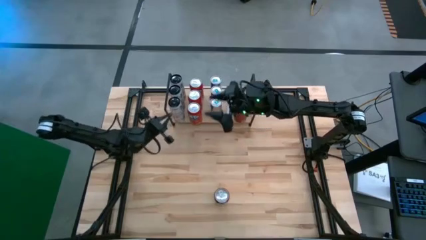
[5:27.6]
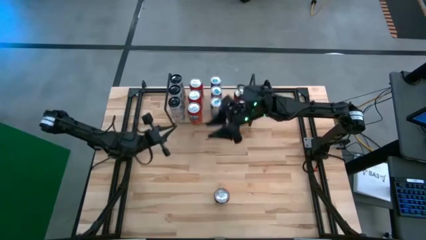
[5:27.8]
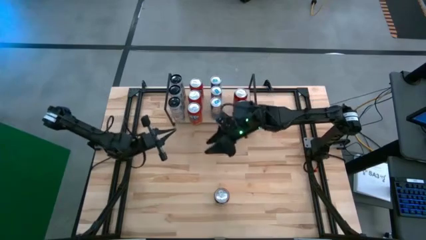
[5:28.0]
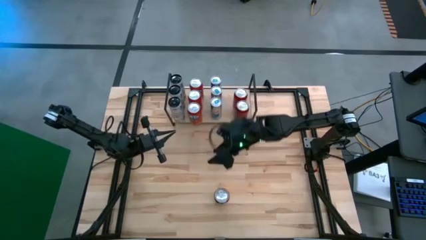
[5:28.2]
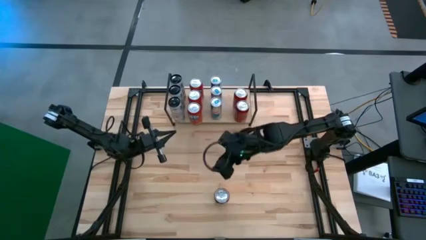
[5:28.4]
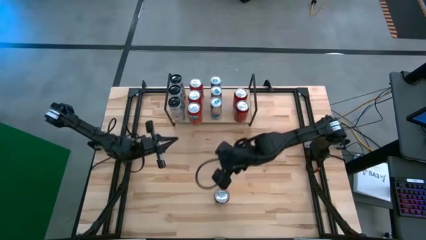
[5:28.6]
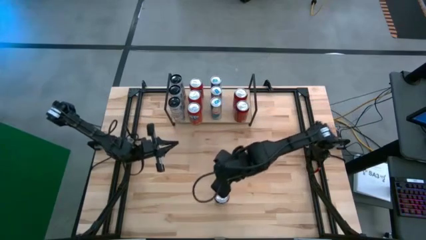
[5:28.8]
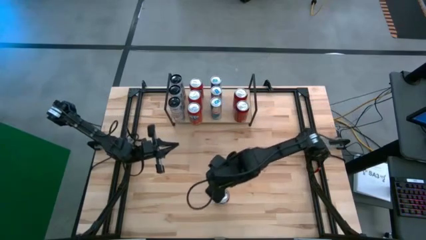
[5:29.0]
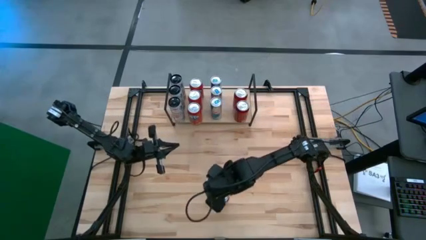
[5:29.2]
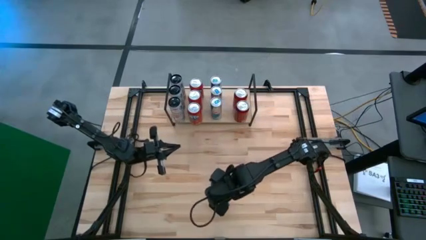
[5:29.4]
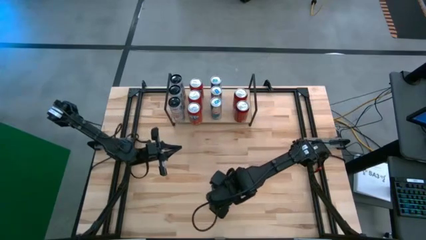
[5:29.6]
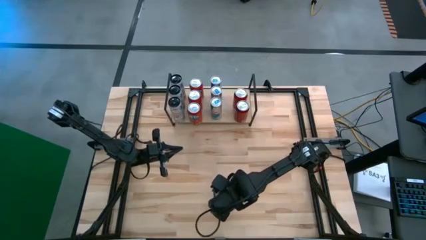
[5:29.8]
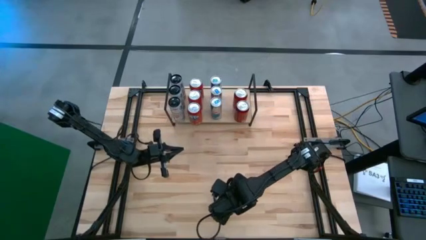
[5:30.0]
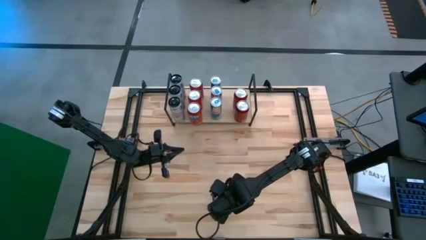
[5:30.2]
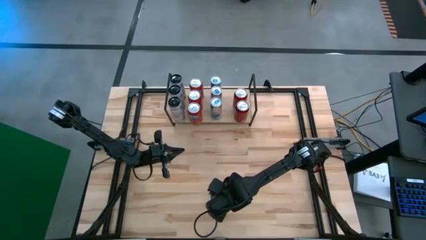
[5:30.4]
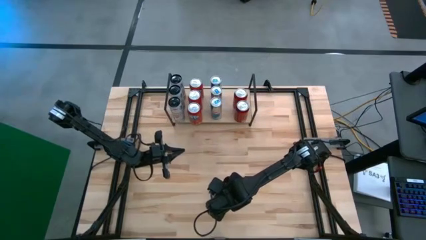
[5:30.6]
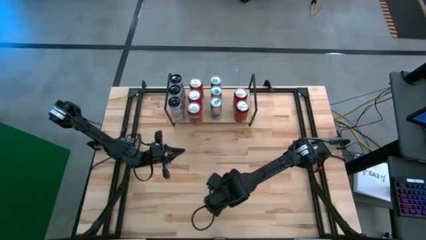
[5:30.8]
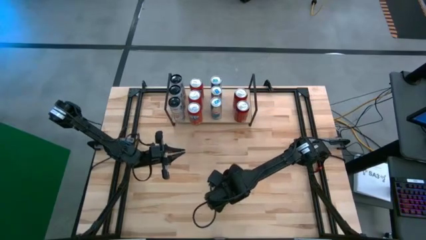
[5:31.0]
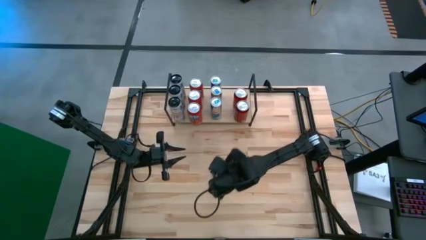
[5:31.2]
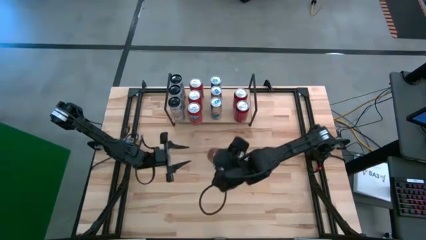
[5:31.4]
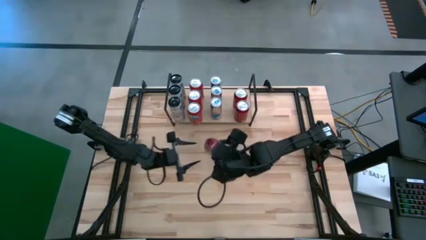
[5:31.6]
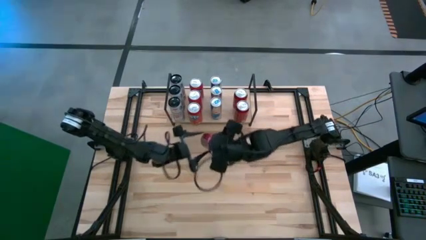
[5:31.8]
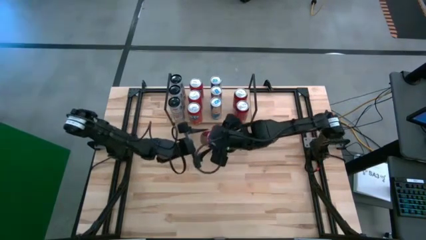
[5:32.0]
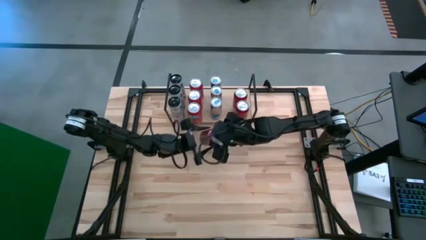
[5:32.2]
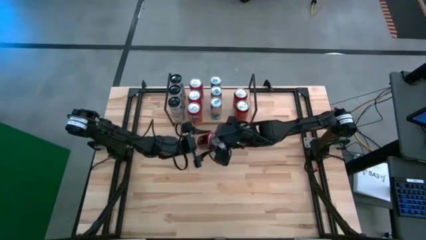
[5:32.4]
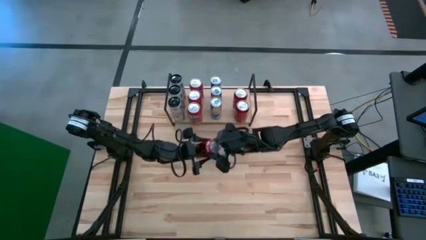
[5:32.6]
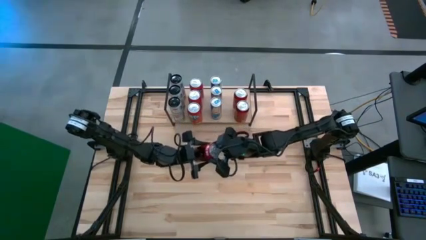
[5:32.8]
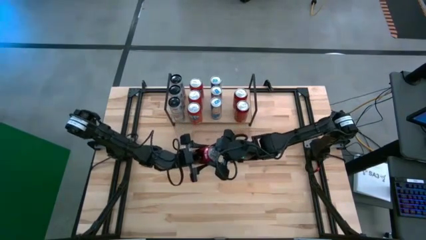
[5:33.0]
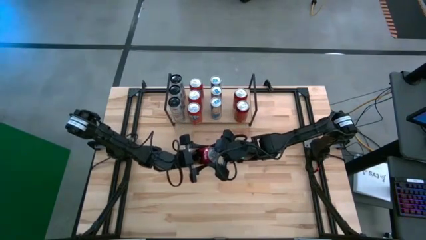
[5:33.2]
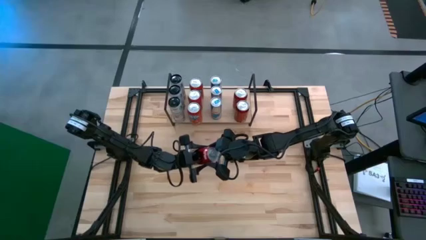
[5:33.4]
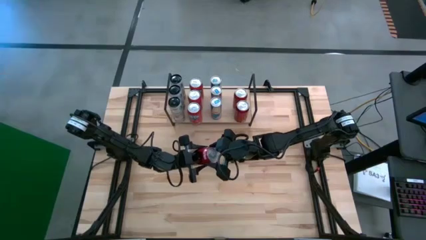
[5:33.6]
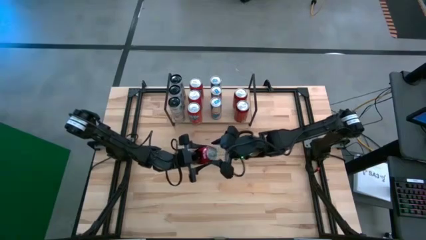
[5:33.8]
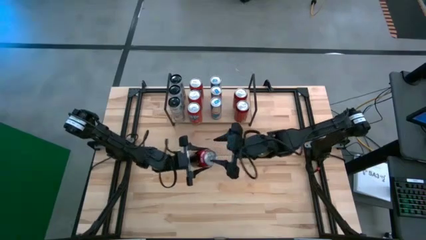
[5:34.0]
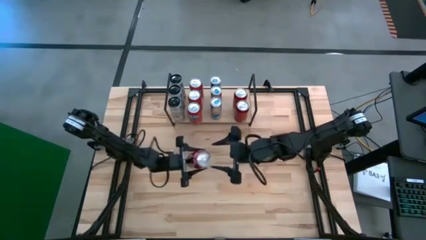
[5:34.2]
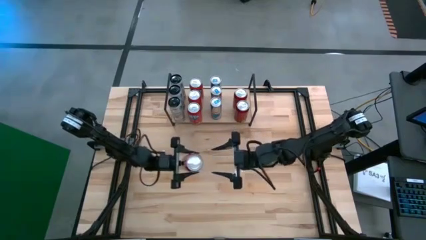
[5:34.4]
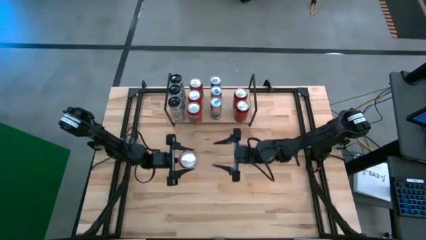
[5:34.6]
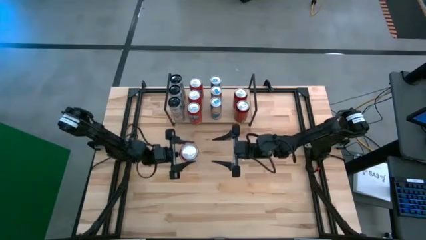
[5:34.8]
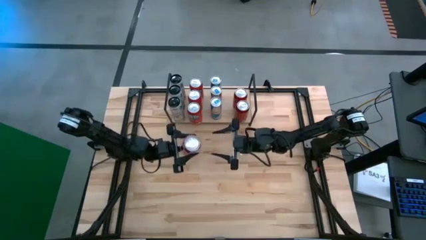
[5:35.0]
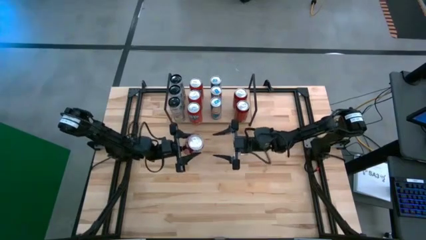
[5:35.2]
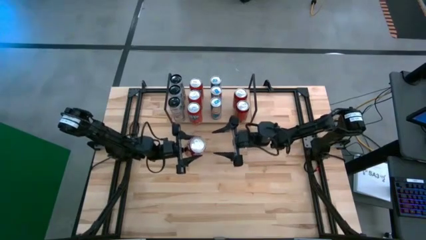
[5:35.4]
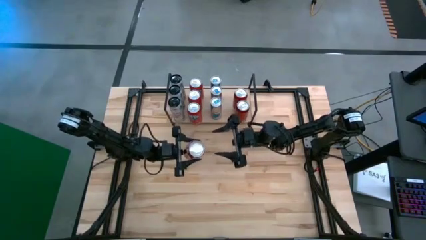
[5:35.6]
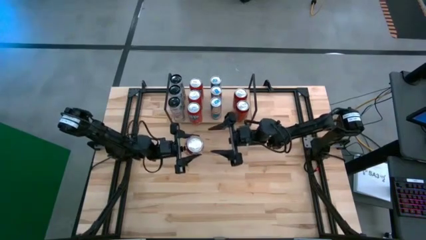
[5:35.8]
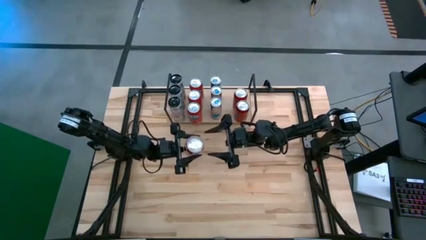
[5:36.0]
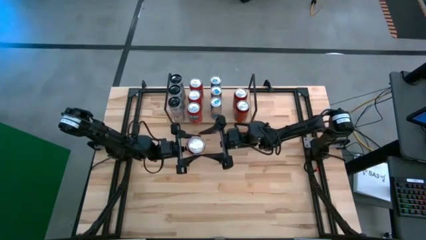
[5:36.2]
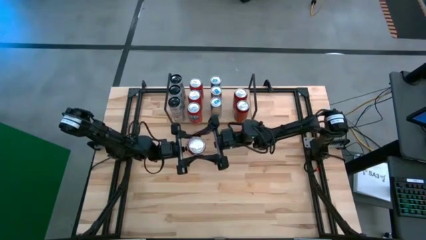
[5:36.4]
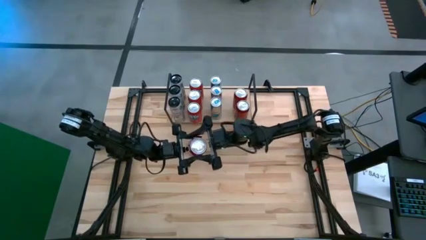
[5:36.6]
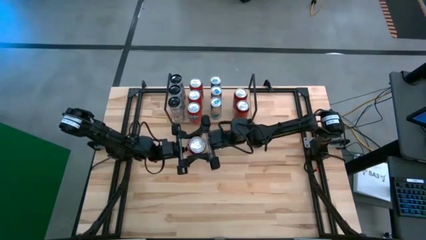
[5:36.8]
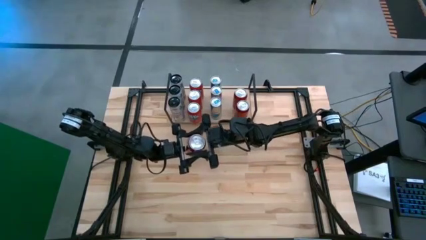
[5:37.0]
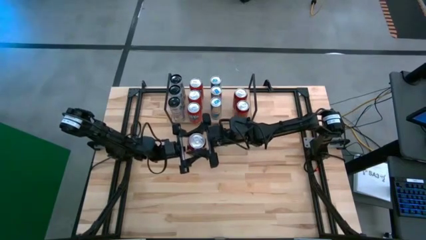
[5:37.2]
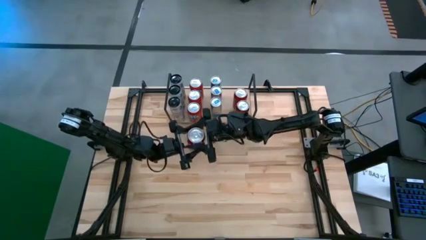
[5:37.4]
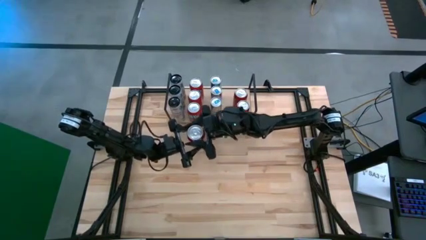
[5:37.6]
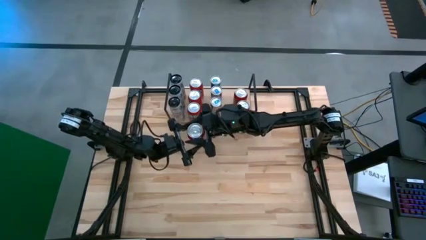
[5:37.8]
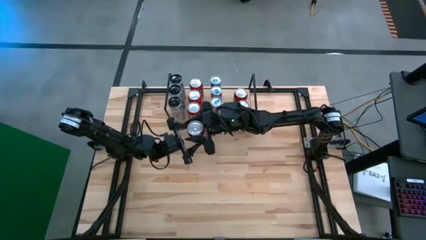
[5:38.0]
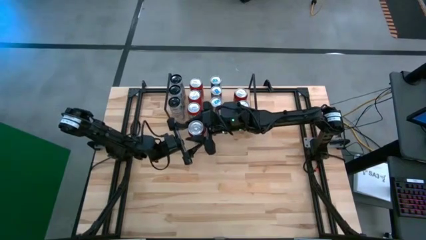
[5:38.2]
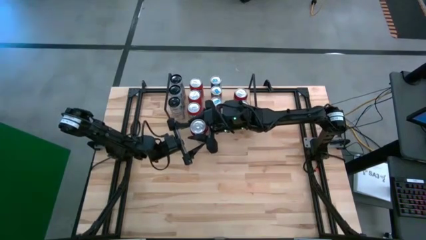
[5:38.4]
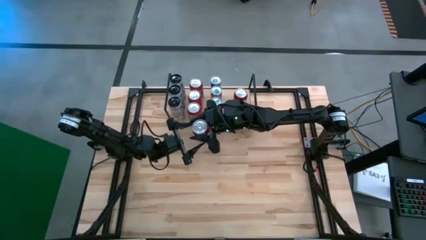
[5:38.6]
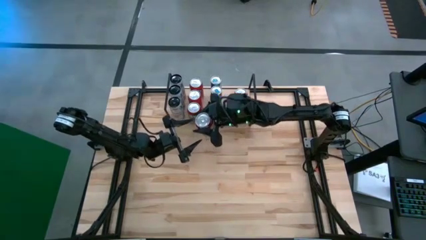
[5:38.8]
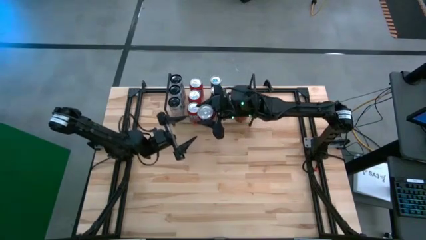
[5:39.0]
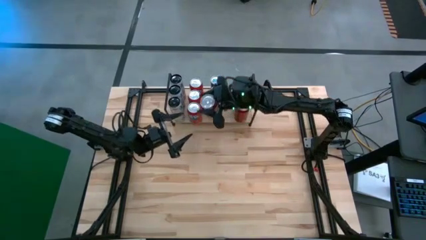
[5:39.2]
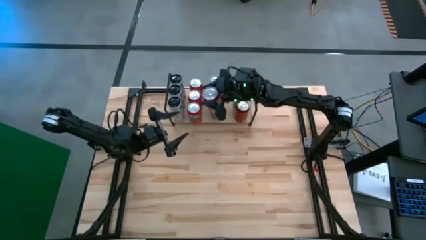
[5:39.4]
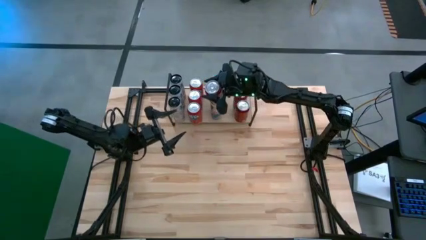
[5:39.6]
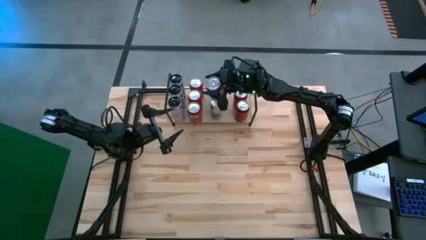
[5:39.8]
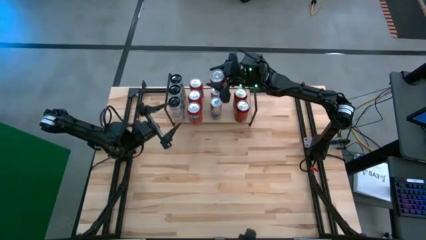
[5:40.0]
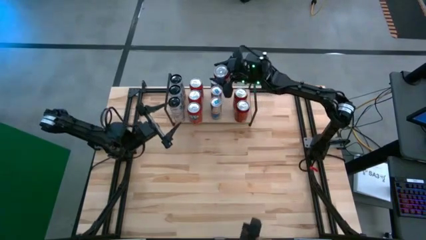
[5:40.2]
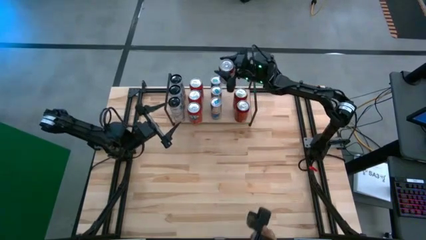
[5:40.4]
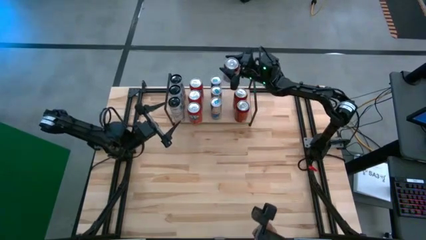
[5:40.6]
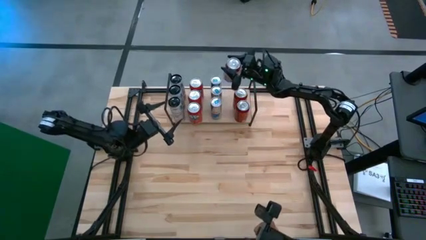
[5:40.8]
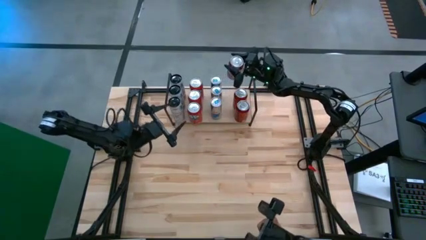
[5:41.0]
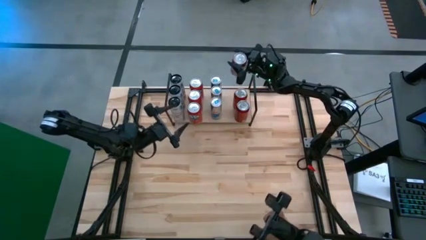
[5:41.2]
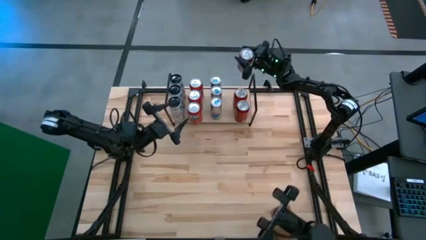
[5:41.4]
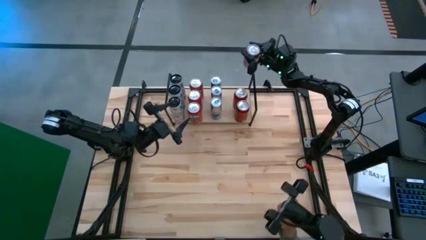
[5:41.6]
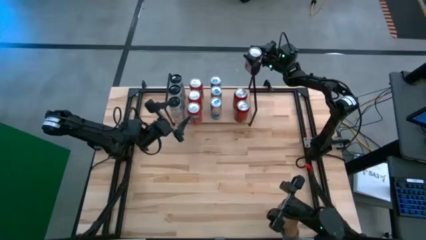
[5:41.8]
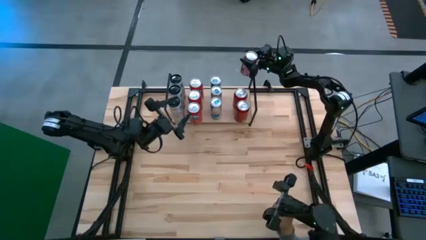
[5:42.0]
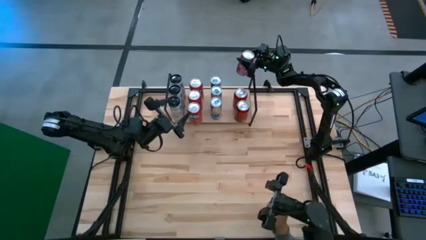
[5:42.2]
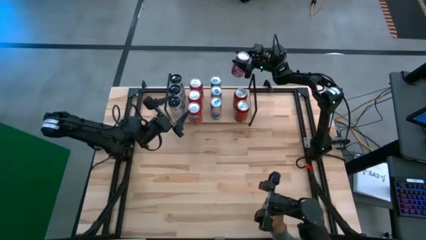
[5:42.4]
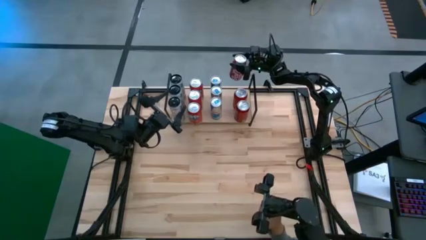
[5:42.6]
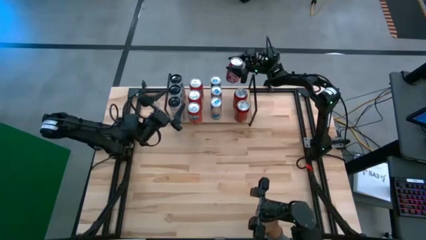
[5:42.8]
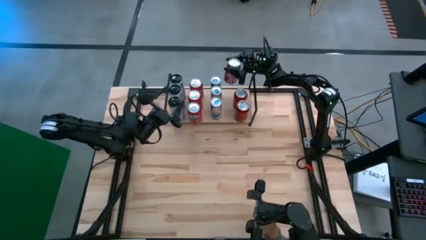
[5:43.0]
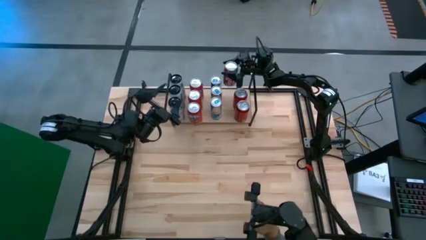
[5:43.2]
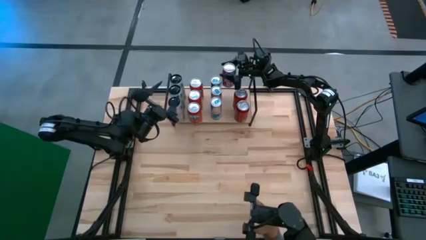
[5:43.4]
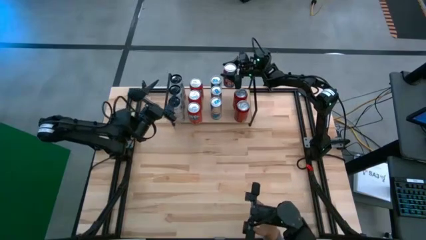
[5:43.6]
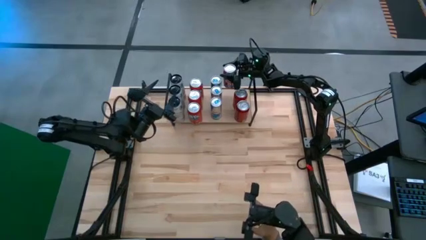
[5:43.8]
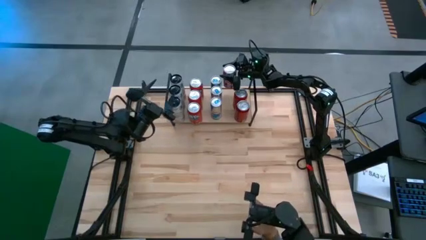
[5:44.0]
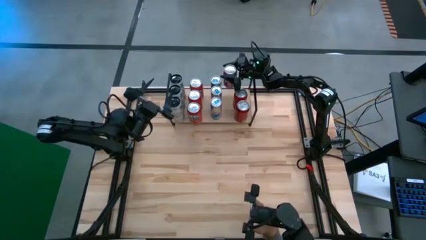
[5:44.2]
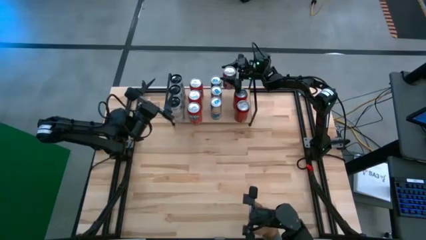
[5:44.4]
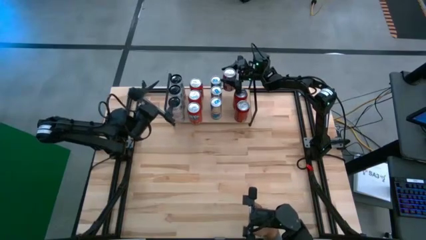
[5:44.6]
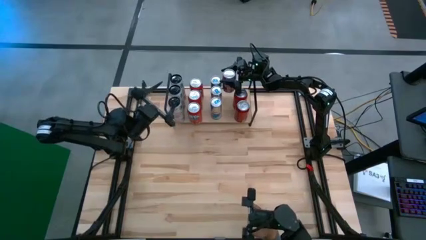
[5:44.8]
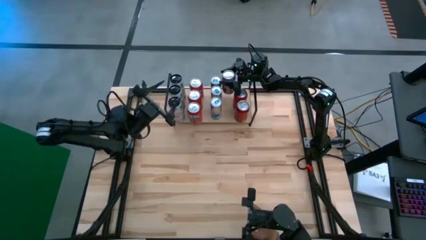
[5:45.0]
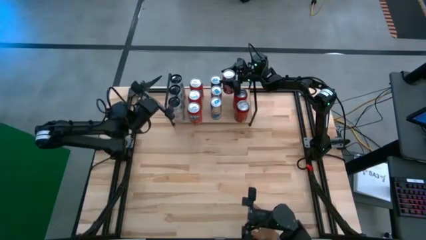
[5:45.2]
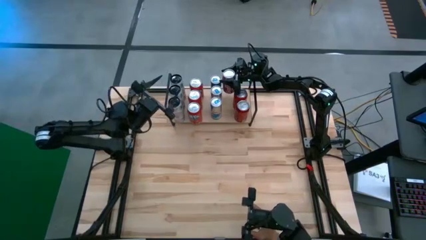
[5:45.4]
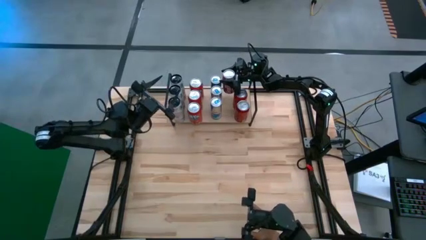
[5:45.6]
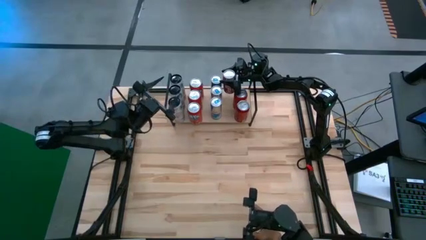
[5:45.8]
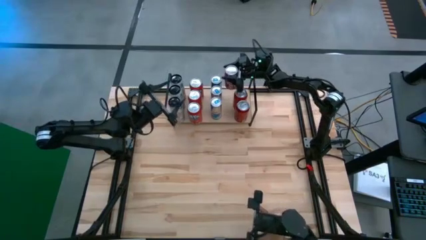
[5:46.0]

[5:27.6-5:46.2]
Task: Place canned beverage on shelf
Put the red soda on the shelf aligned with the other red soda cans
